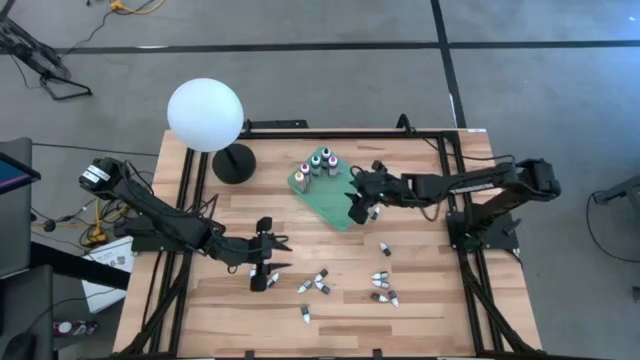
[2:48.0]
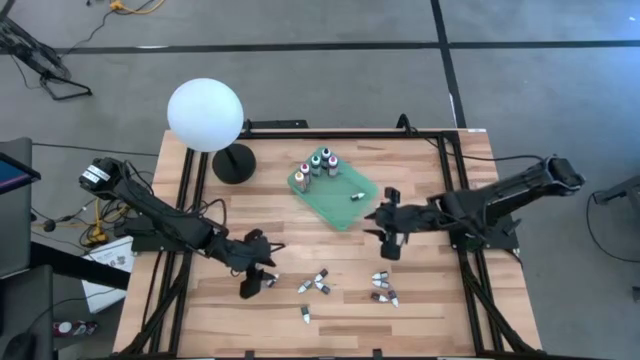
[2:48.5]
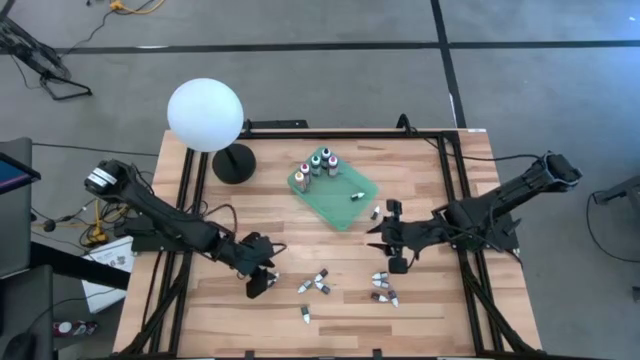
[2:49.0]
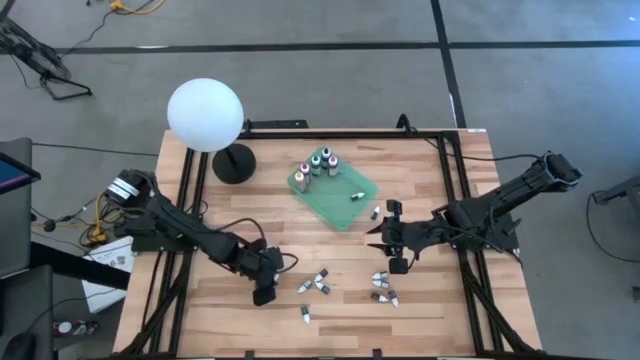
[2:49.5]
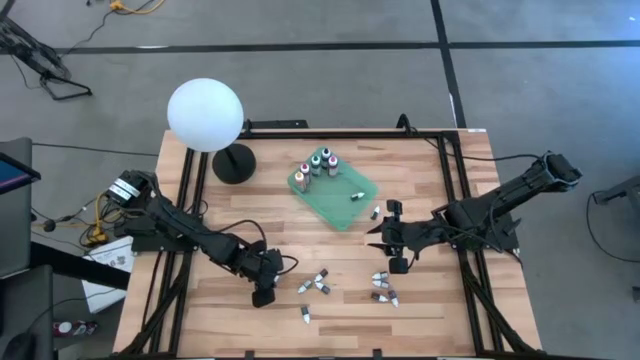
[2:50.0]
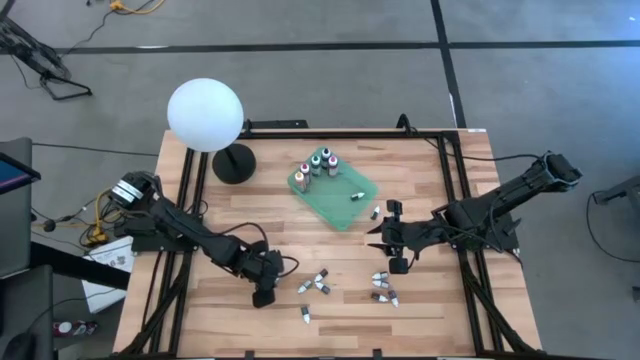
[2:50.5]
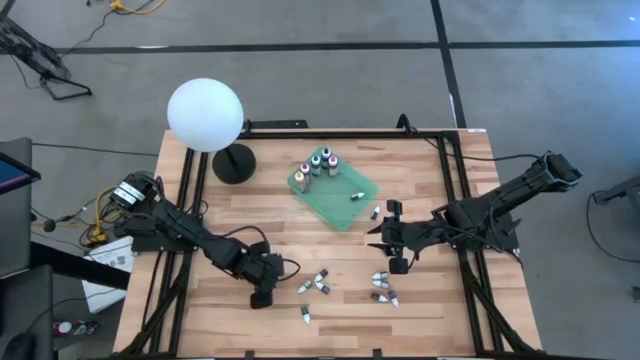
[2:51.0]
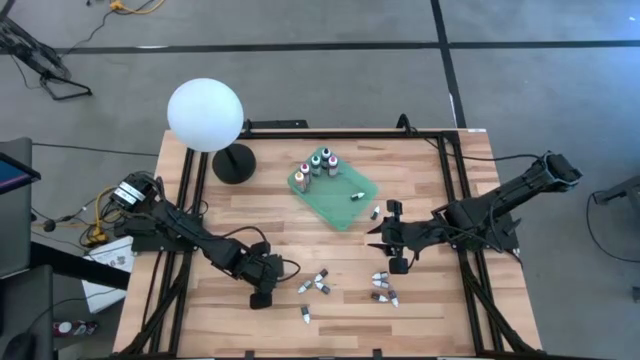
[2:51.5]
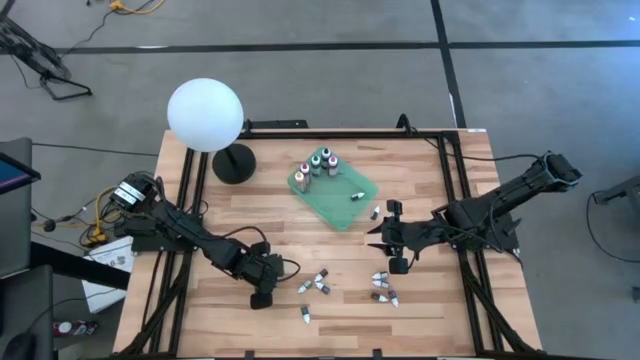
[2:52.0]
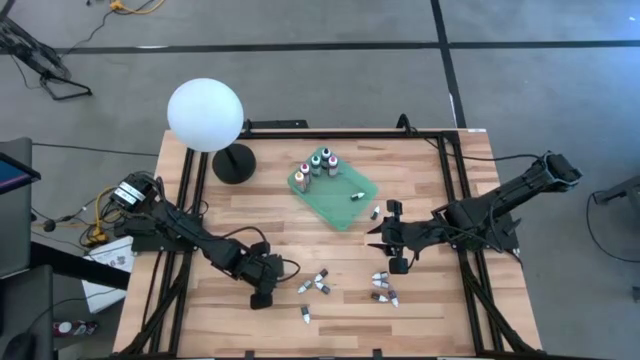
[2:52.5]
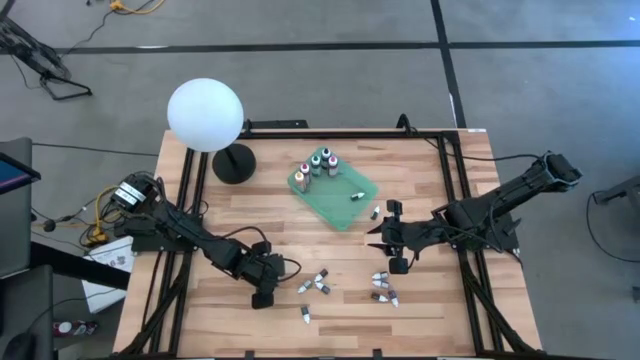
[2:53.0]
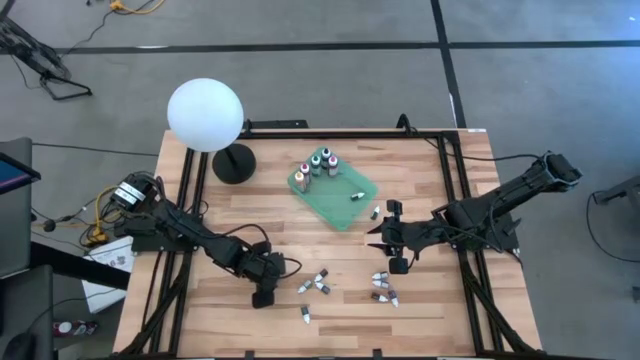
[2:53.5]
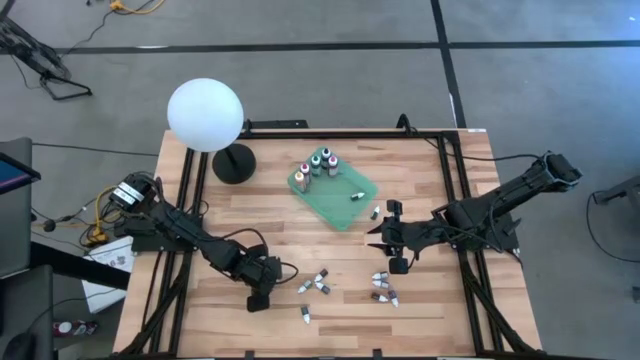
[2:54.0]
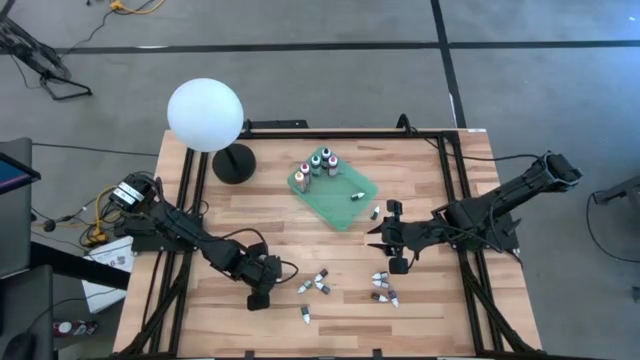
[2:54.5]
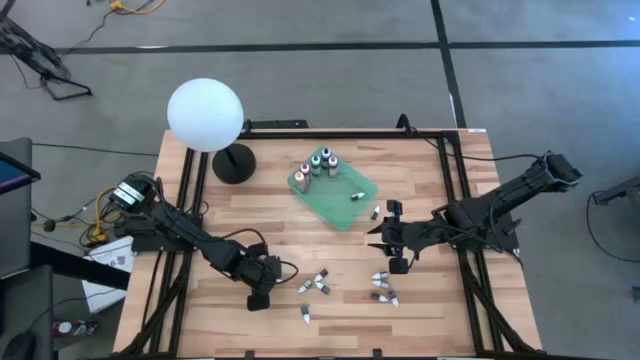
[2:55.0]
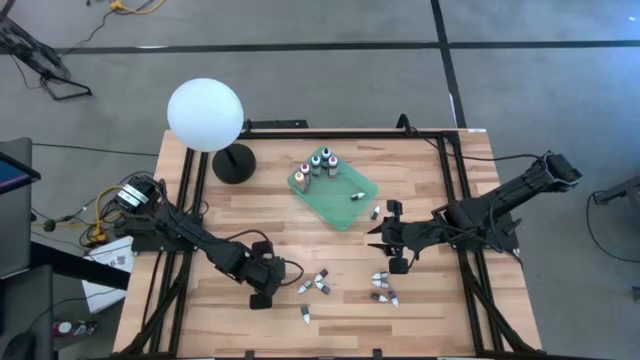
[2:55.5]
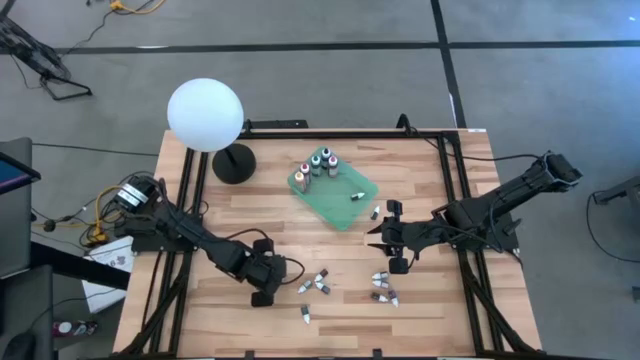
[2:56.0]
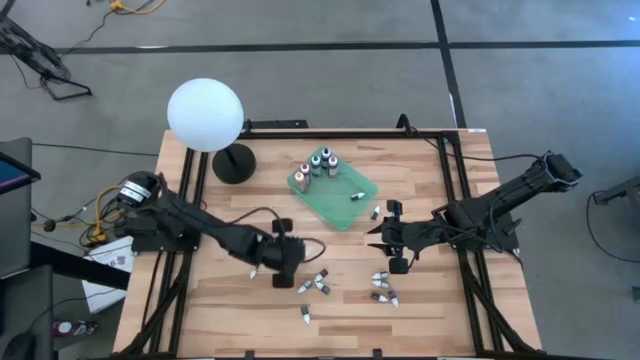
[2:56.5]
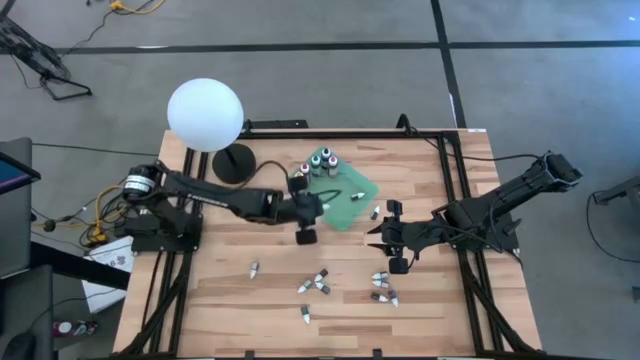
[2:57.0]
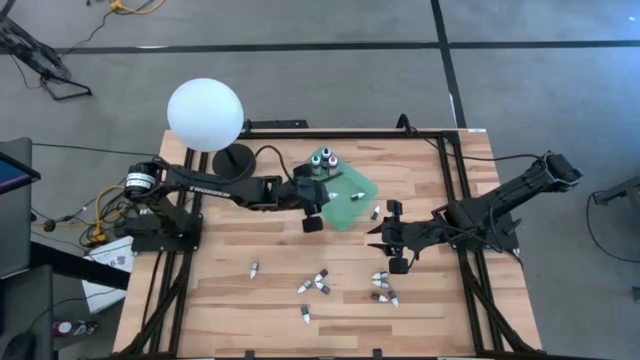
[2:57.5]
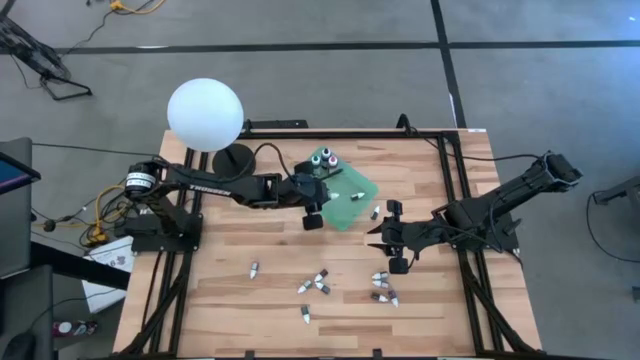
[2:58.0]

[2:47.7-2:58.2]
Task: Pick & Place food coloring
Put the small black food coloring bottle into the green bin

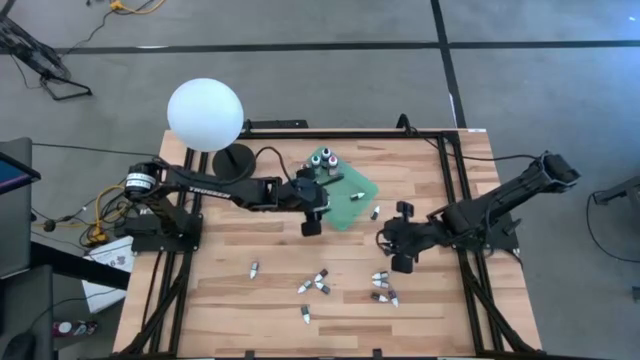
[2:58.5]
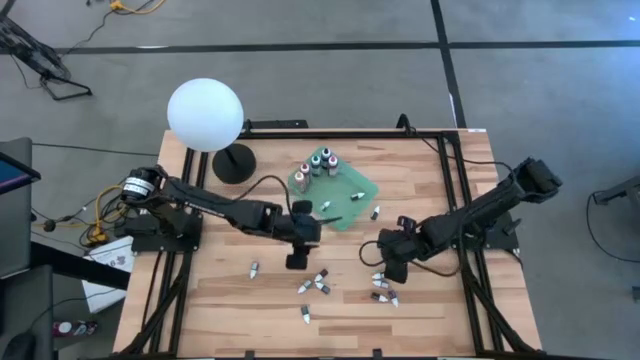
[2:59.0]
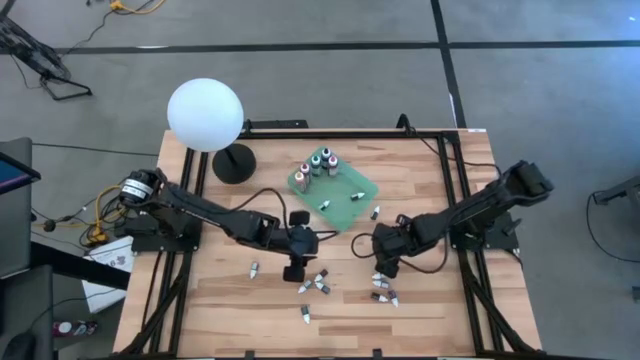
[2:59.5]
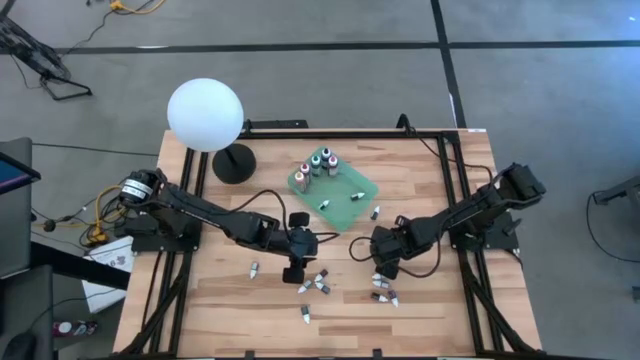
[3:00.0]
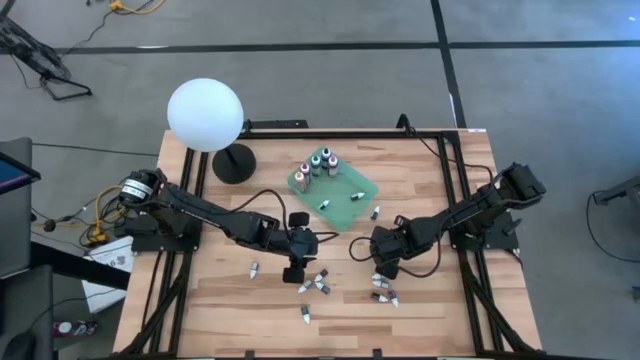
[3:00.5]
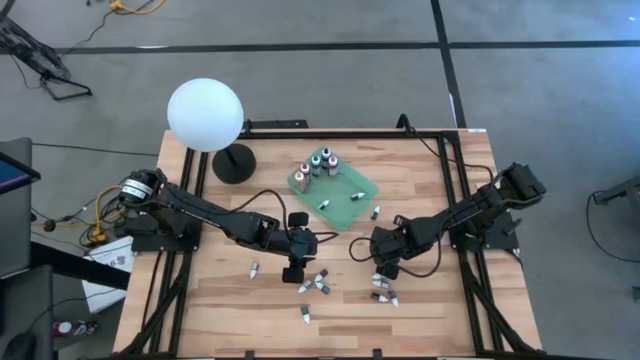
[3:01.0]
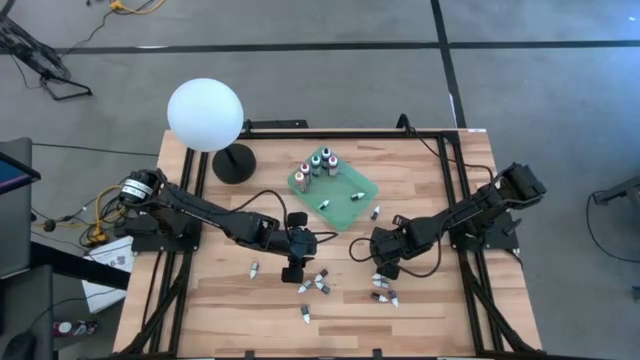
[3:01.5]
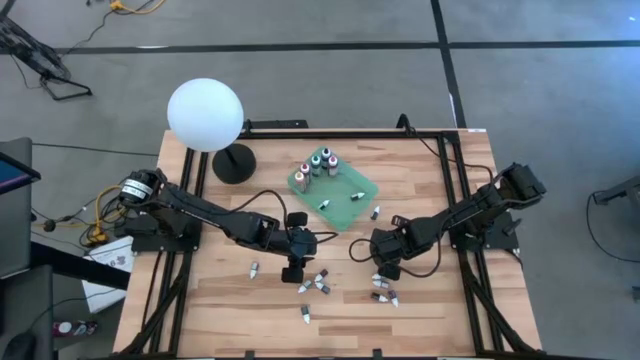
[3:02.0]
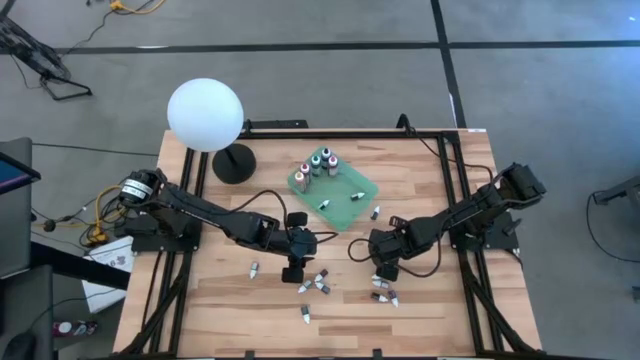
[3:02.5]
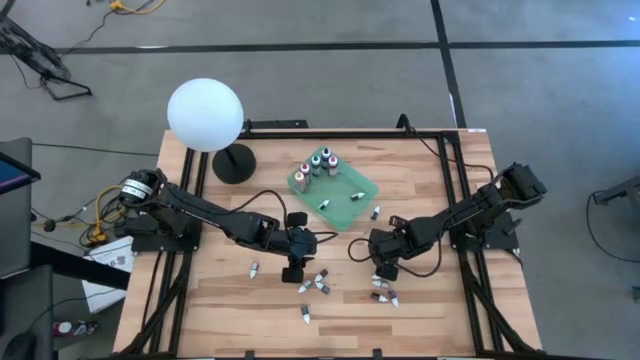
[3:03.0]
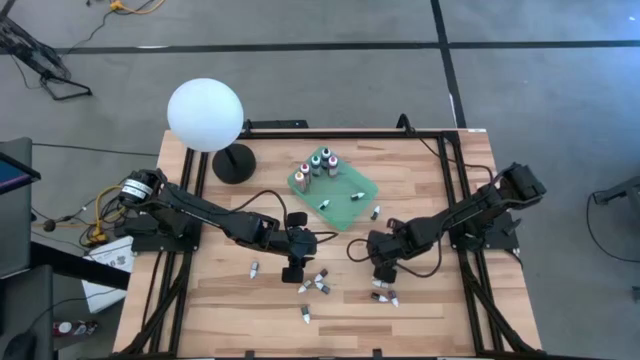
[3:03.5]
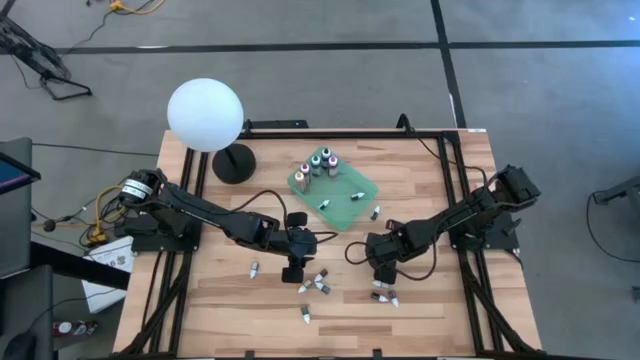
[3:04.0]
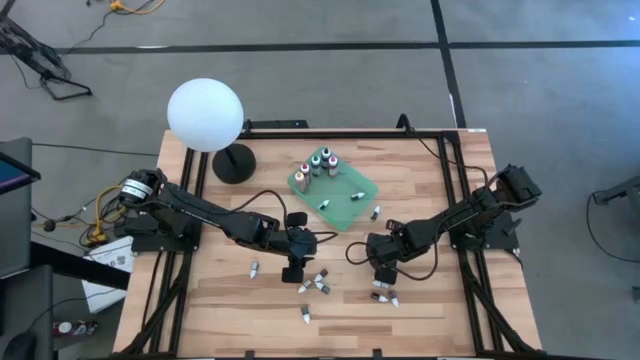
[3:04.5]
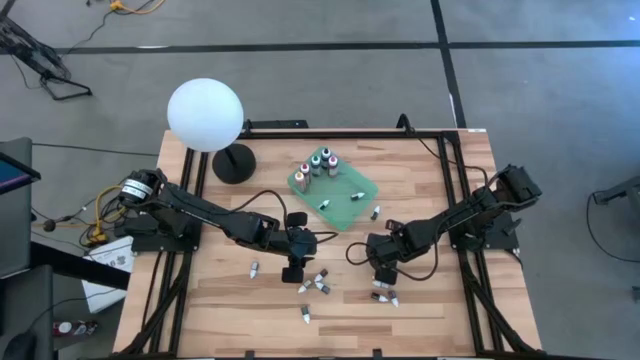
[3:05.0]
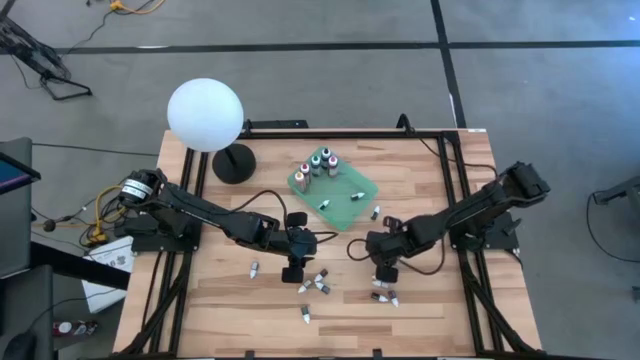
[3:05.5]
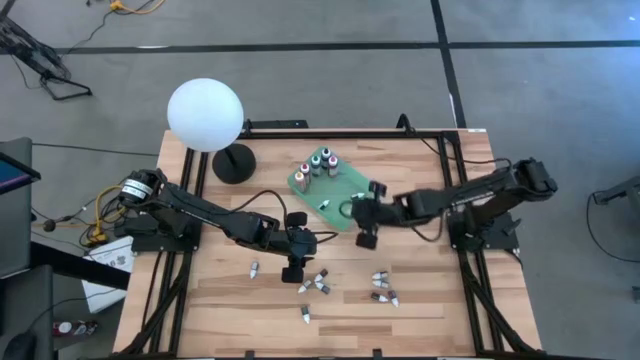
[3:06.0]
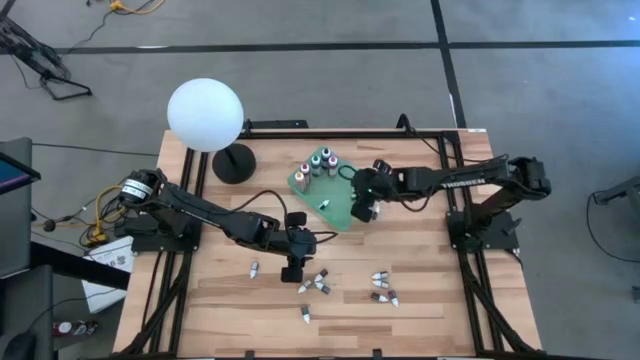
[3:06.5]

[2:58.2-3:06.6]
Put the small blue food coloring bottle into the green bin

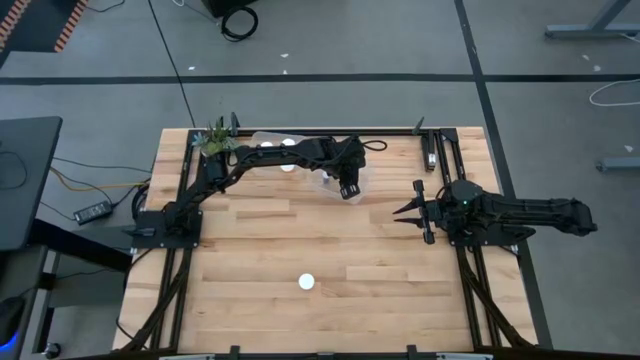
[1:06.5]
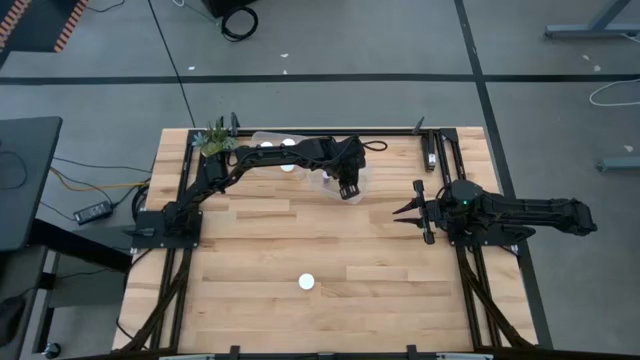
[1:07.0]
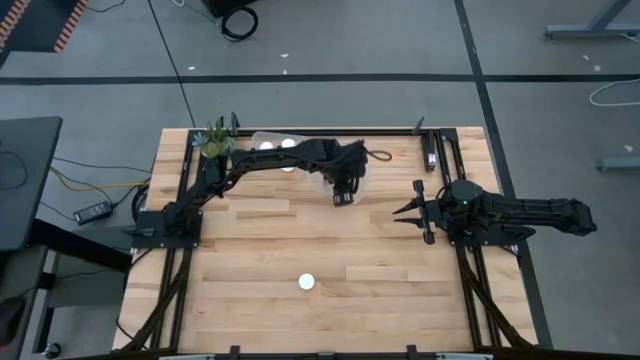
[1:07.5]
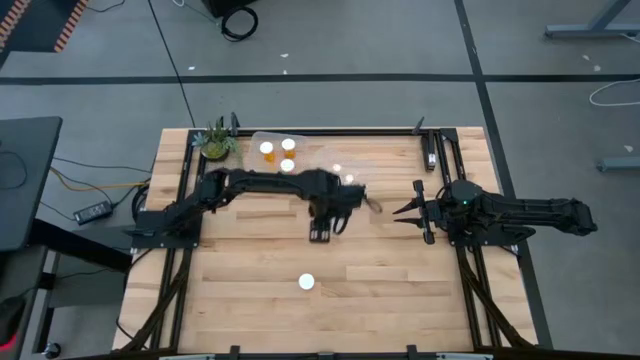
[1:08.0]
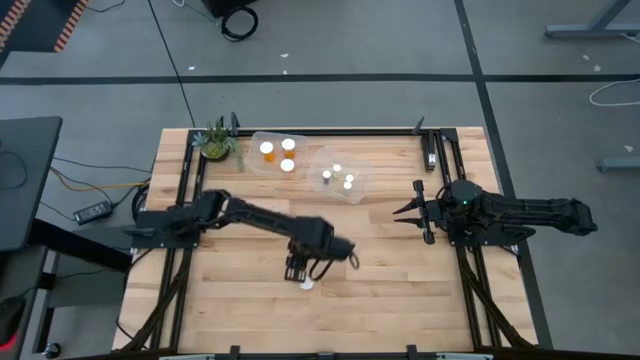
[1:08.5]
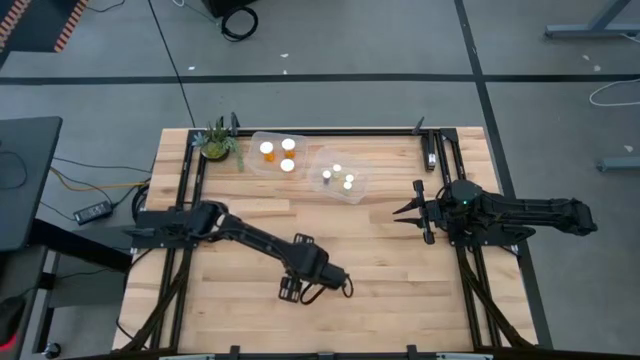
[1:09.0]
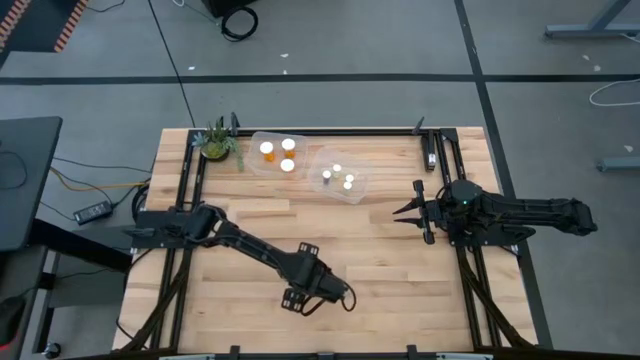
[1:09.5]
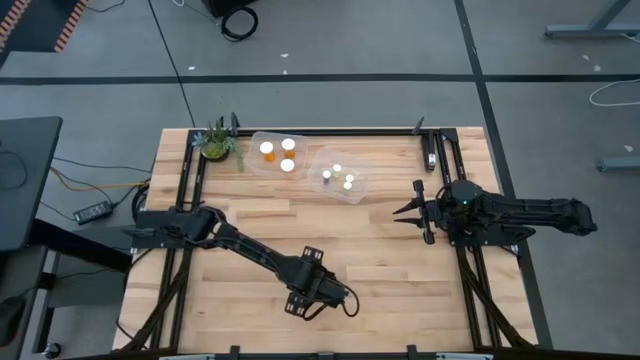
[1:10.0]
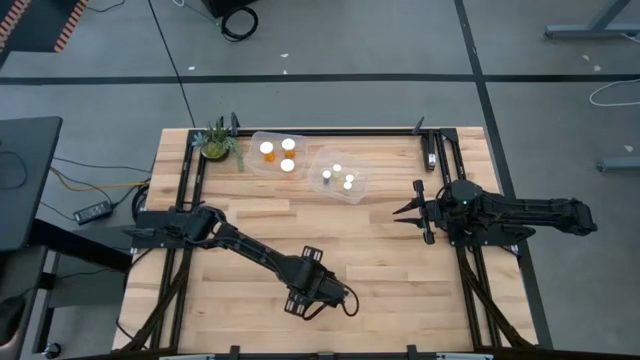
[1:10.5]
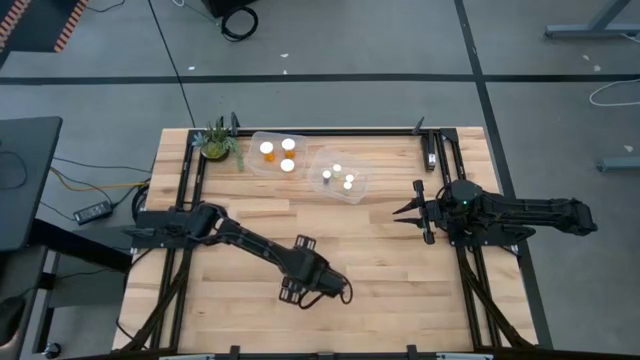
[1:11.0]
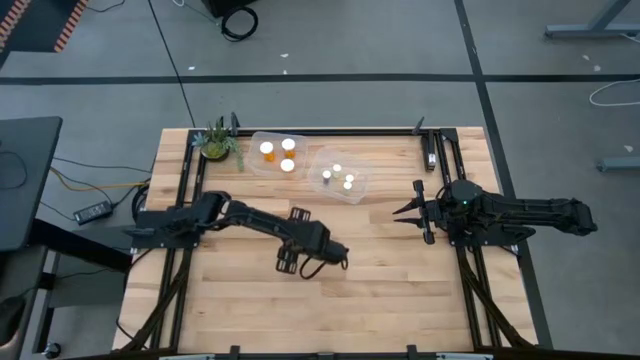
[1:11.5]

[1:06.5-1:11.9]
Task: Pick and place medicine bottles into bin by pill shape (circle, oval)
Put the big orange pill bottle into the left transparent bin
